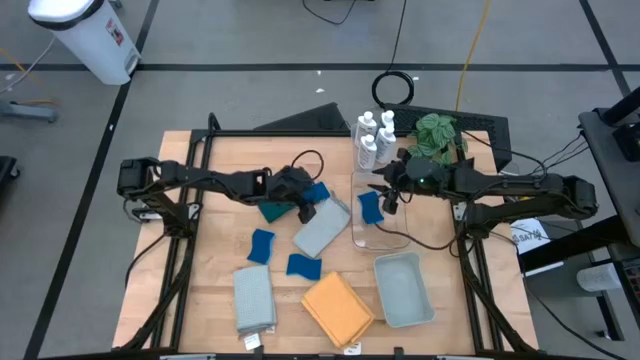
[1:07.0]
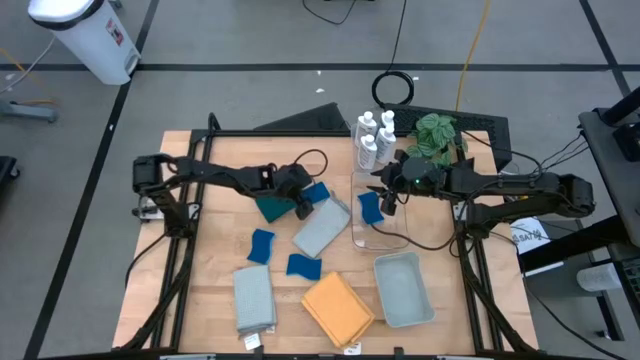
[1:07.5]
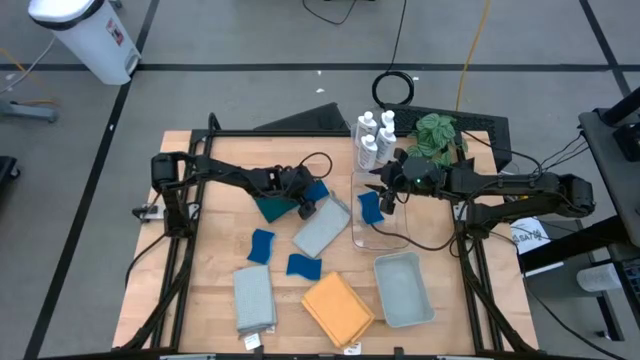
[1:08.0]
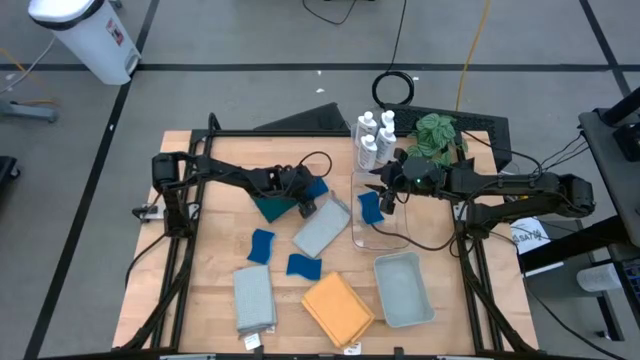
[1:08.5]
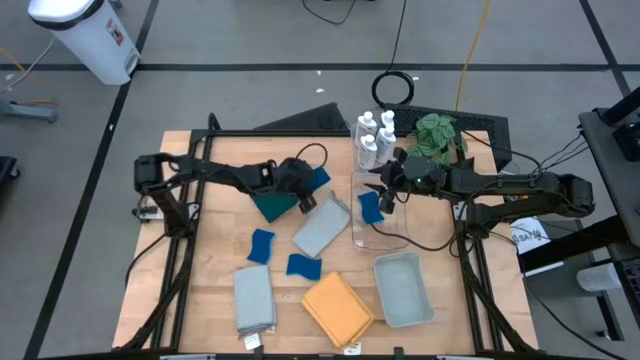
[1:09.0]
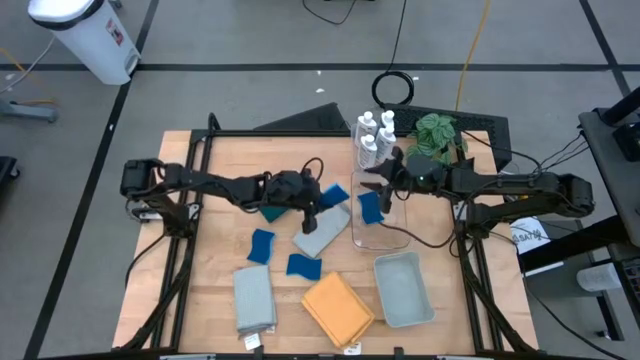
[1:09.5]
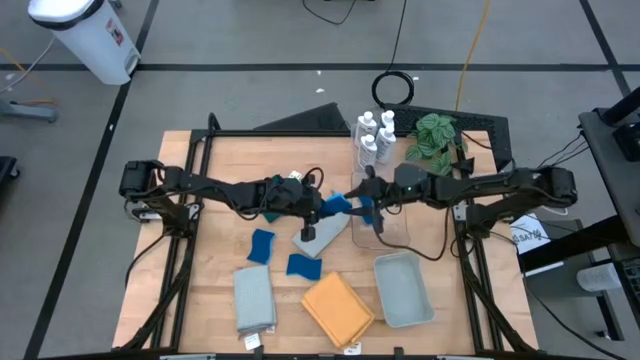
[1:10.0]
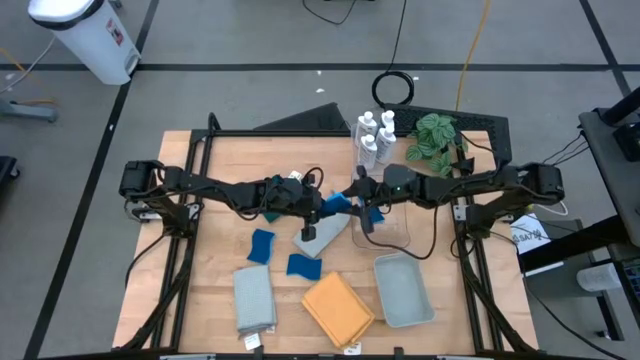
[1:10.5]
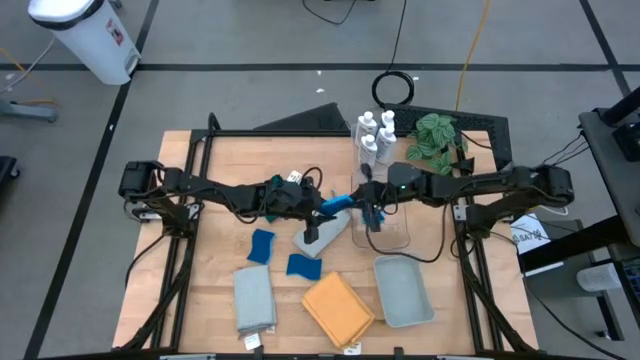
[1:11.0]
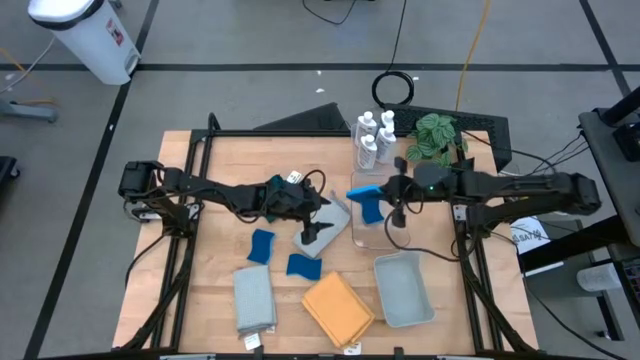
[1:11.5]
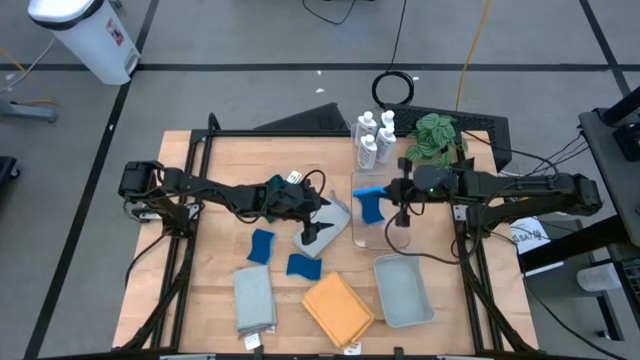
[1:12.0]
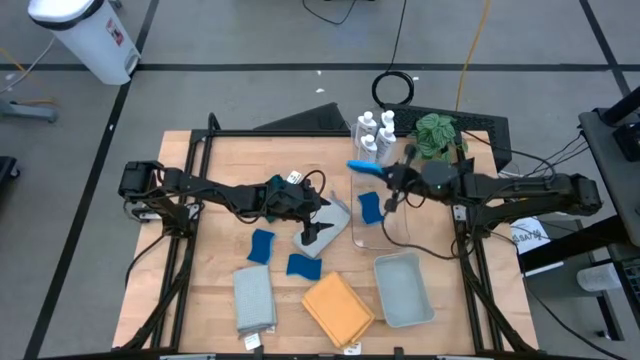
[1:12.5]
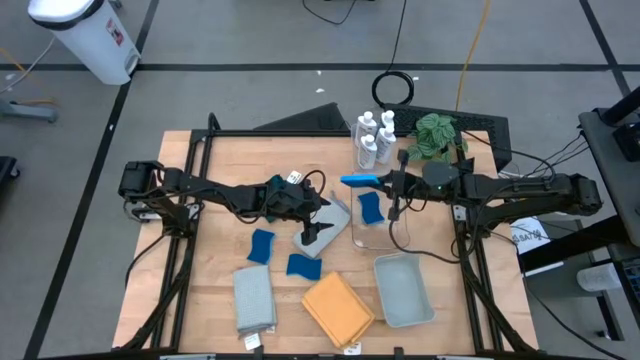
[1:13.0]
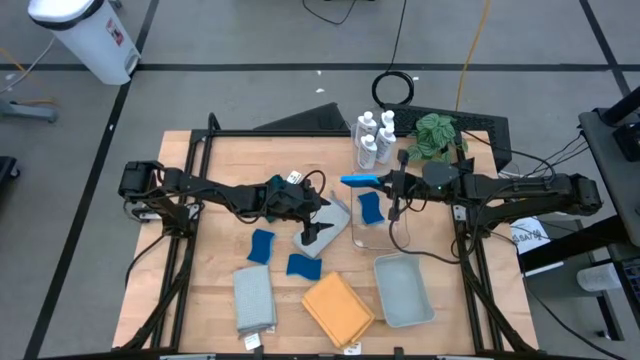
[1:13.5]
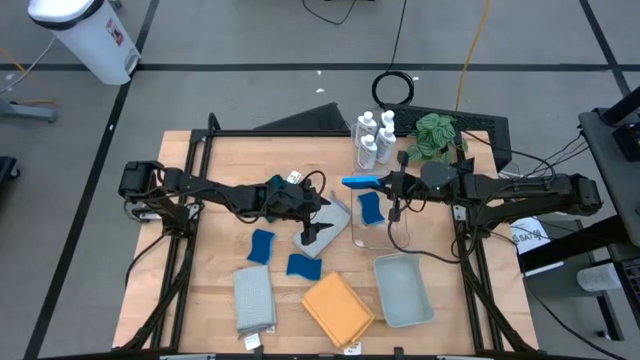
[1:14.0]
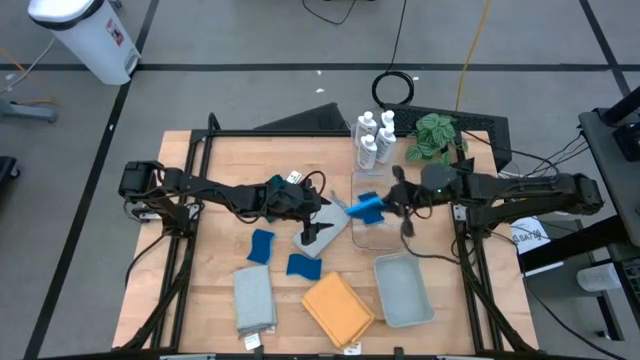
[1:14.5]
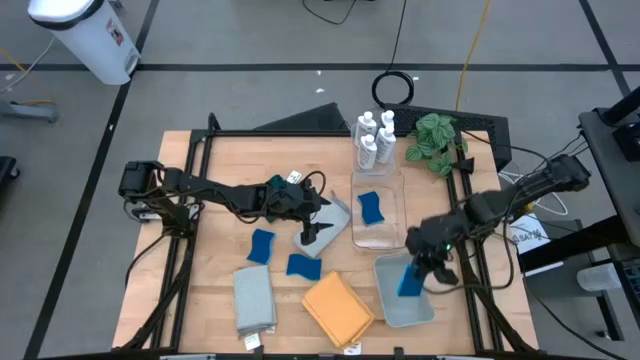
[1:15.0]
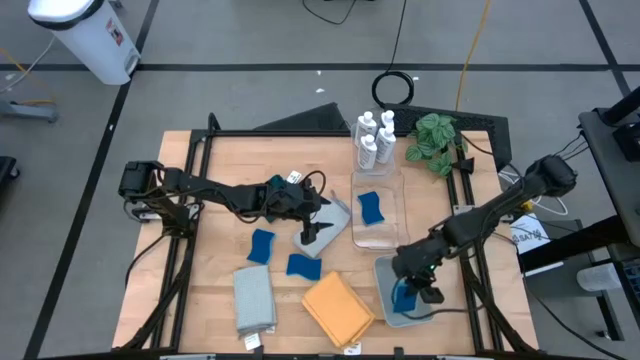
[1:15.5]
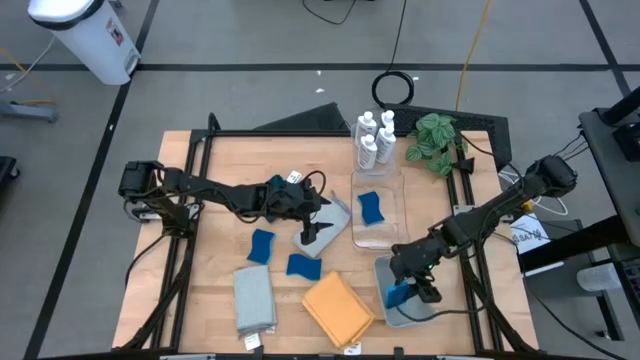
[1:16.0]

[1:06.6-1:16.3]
Task: Pick & Place Kitchen Items
Put the blue sponge into the gray bin

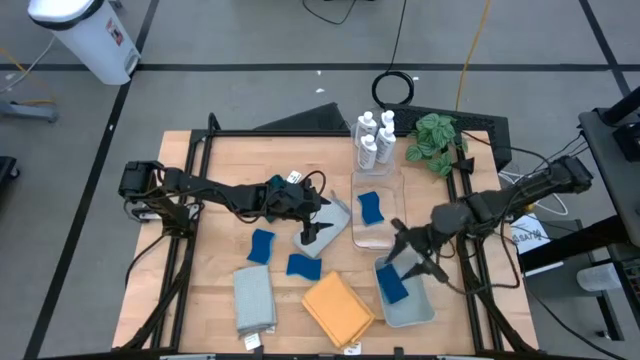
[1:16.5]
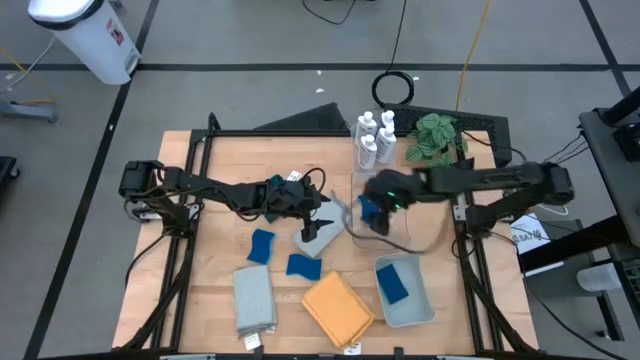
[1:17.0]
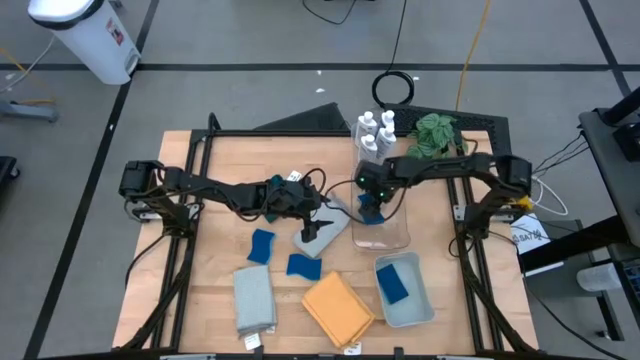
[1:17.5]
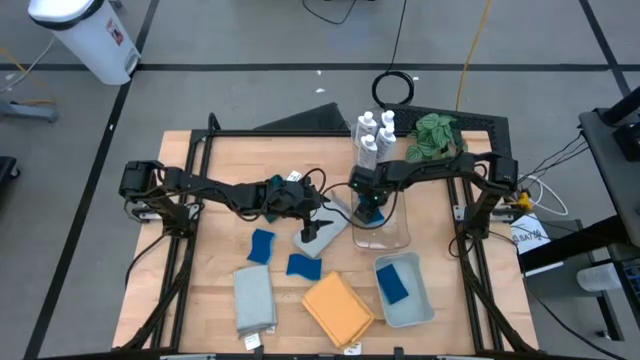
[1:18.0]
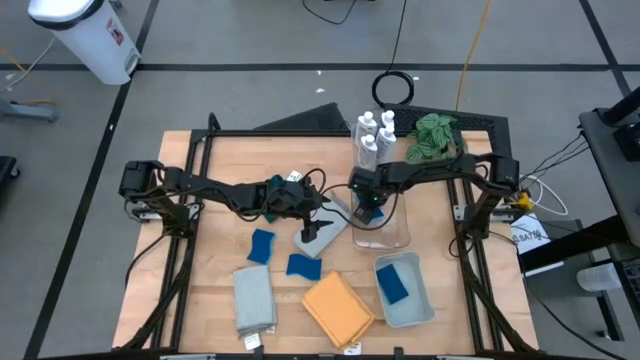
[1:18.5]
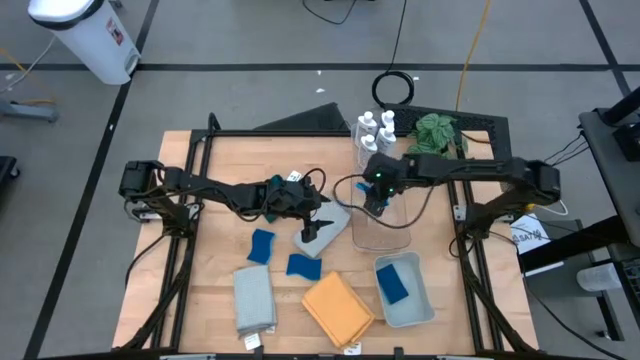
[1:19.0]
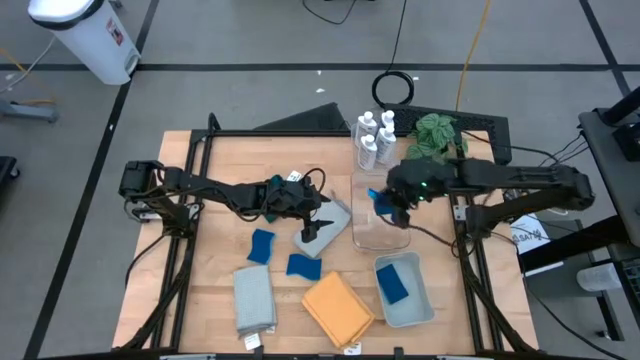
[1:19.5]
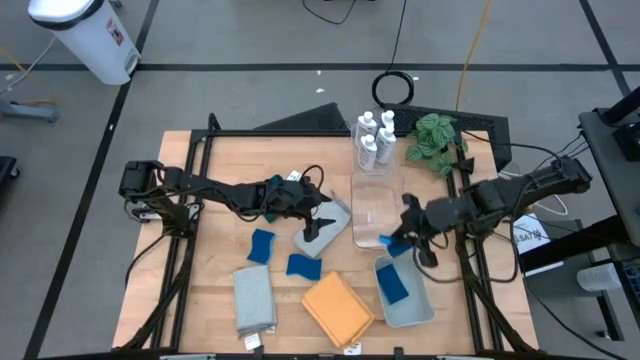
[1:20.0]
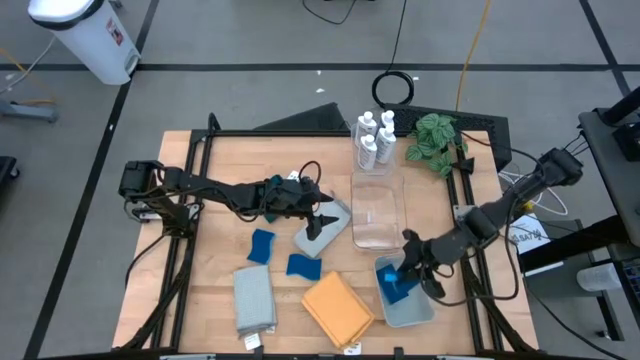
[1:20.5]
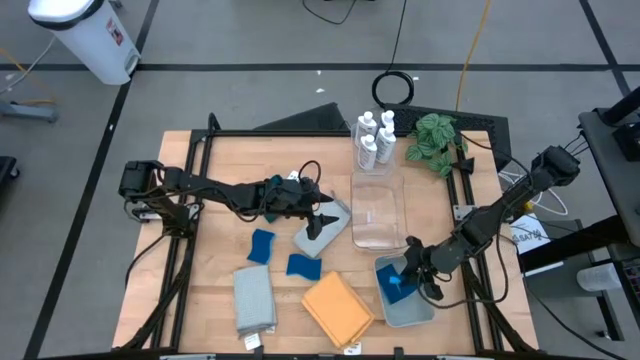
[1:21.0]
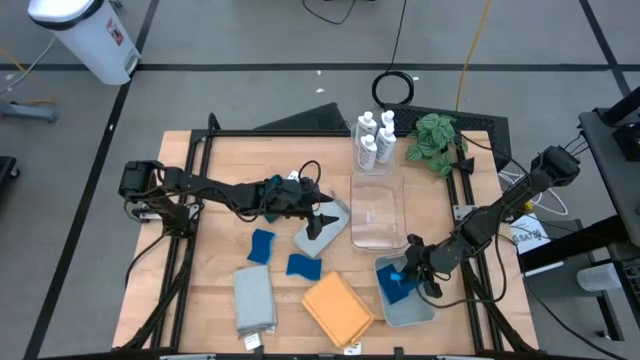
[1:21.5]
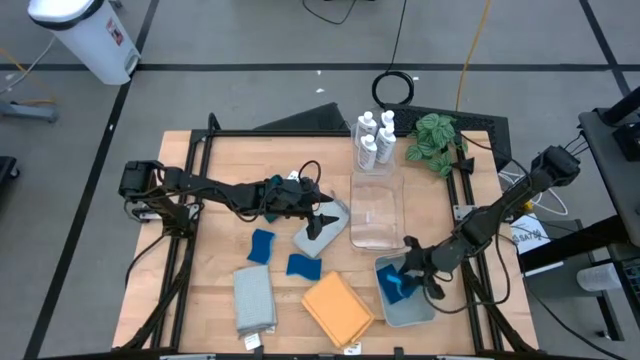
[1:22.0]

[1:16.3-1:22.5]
Put the blue sponge into the gray bin

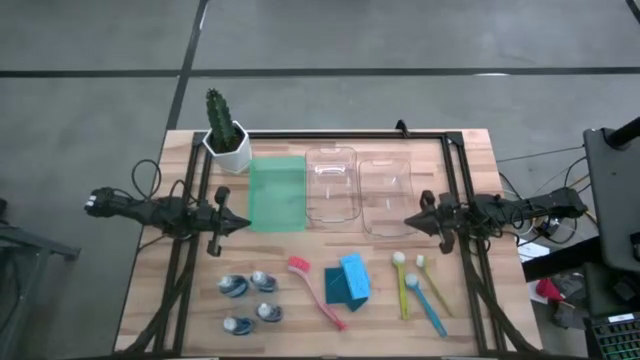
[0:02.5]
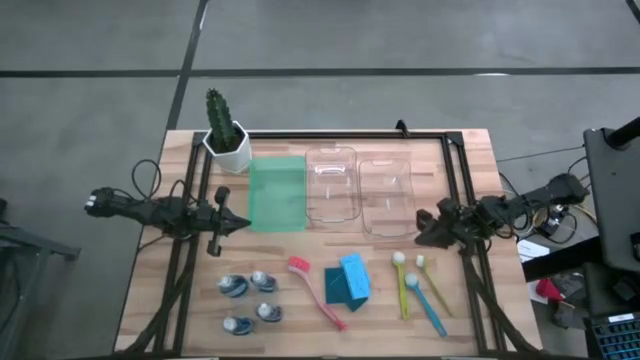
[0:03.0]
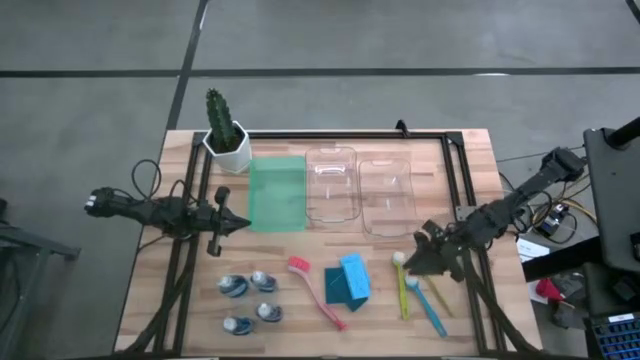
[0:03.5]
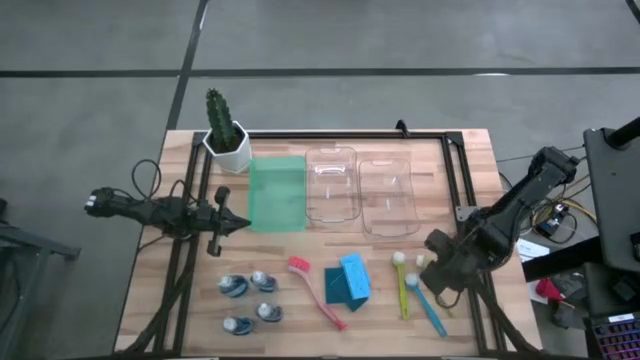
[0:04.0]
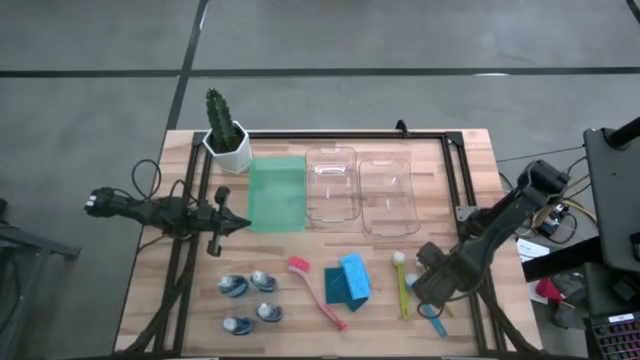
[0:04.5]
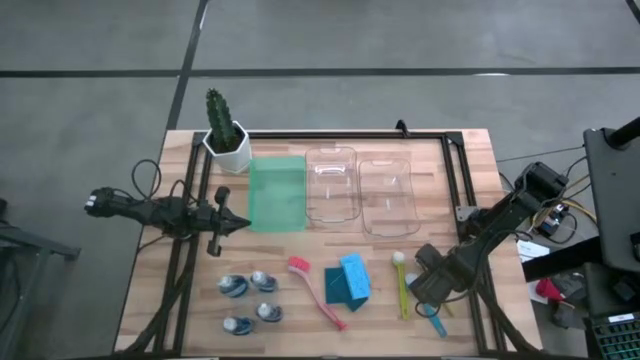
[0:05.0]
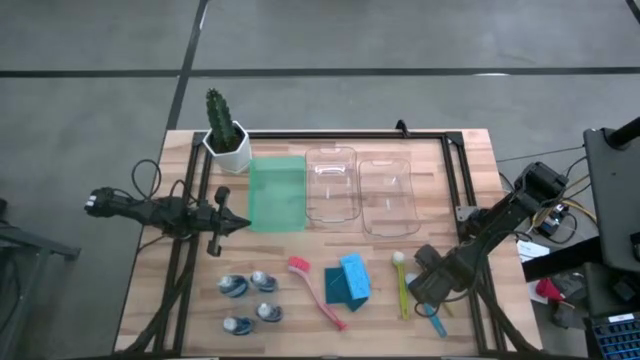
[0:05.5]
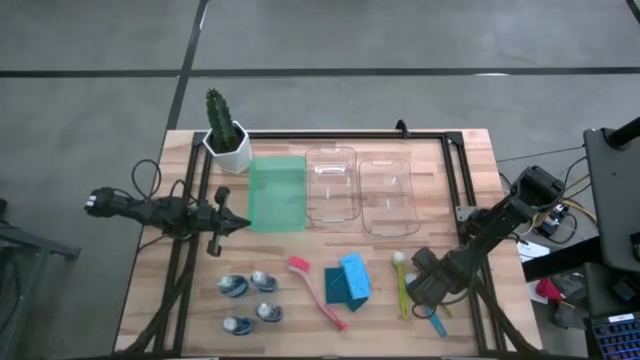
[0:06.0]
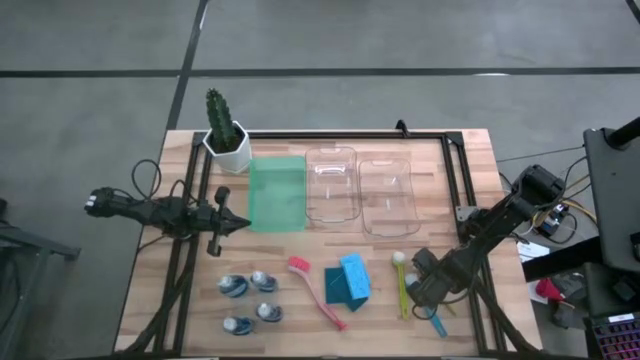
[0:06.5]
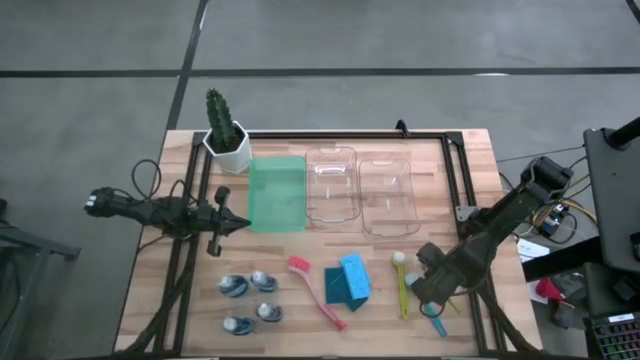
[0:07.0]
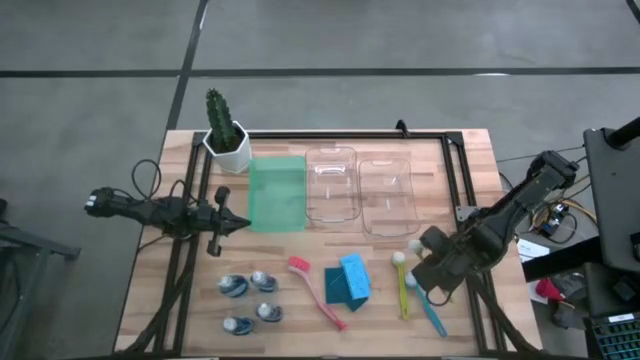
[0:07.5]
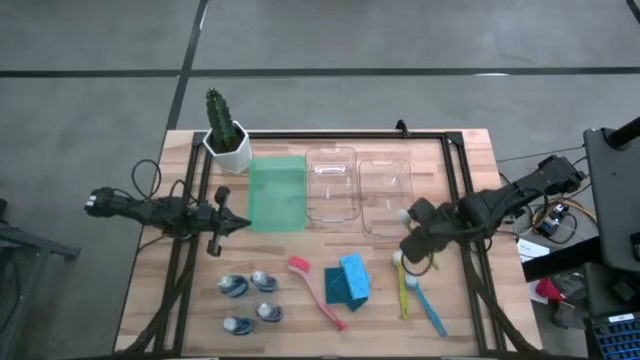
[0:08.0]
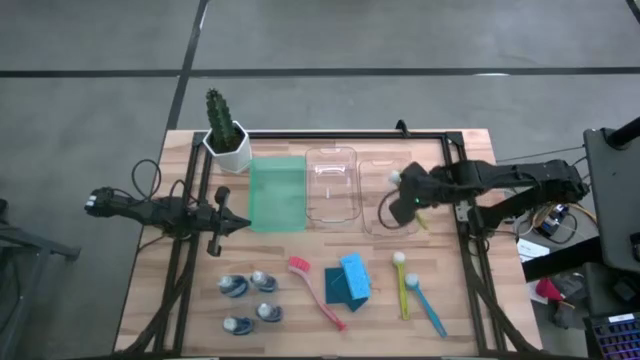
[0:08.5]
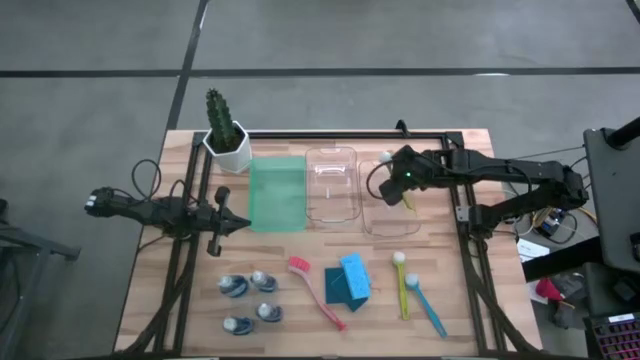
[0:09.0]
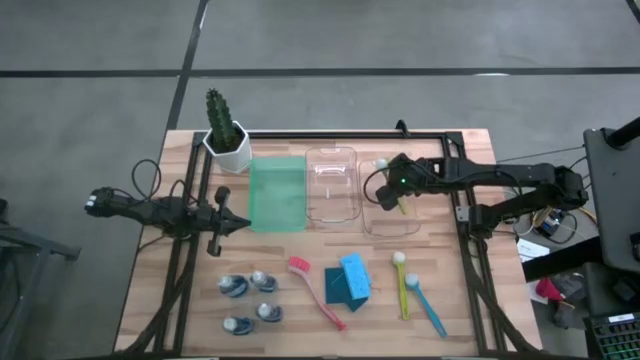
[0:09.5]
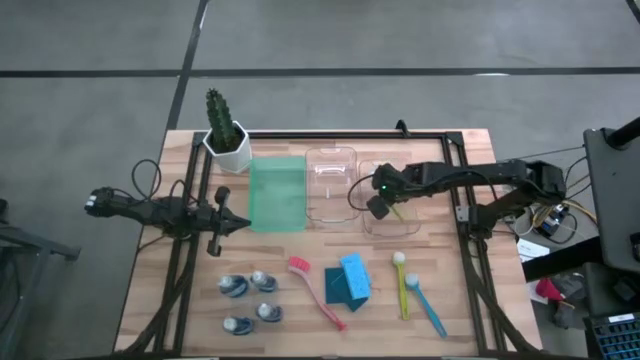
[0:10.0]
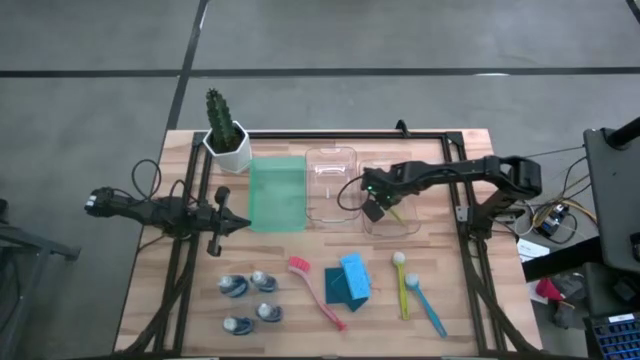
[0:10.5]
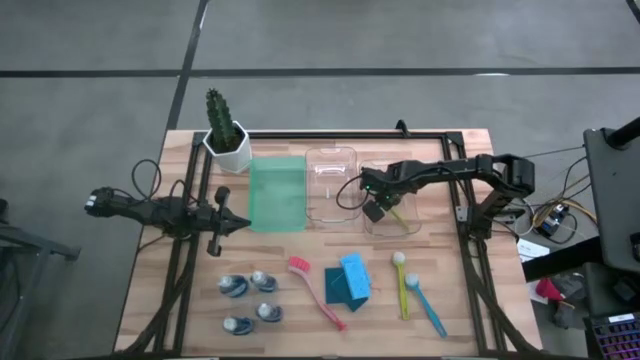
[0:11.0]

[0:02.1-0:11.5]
Task: Pick & Place Kitchen Sink Supplies
Put the green dish brush into the right transparent bin
